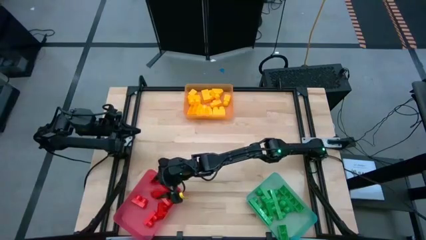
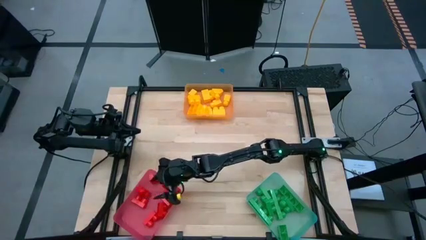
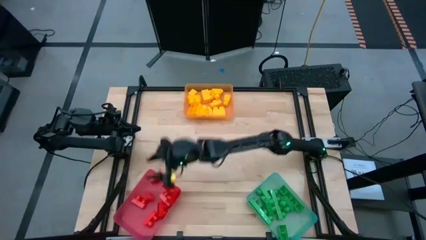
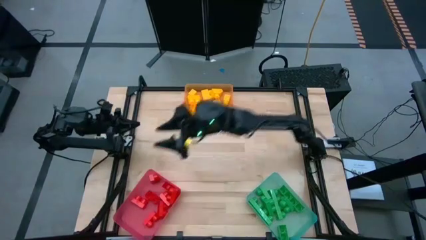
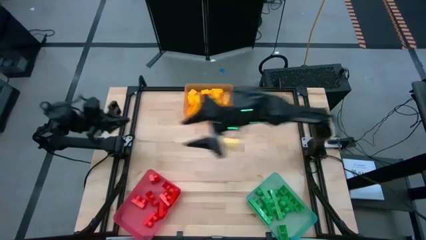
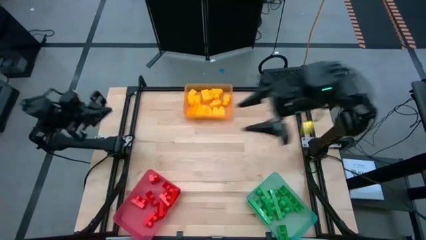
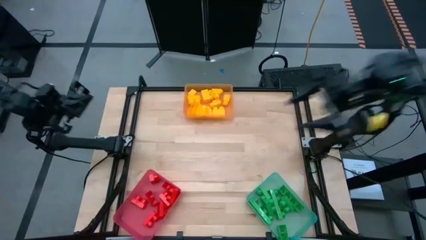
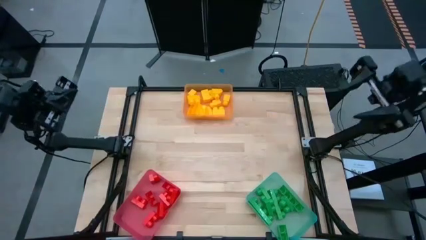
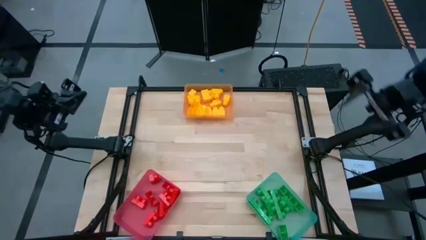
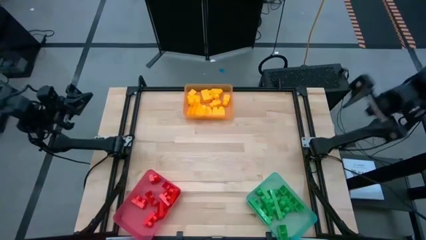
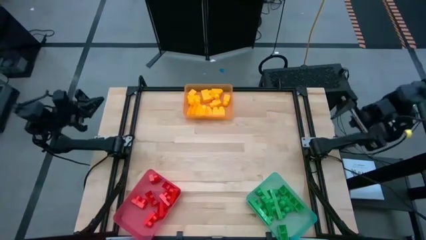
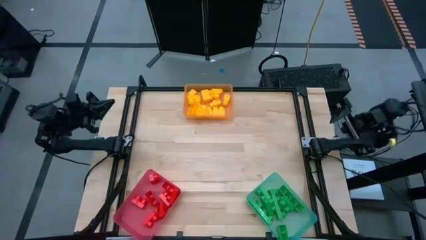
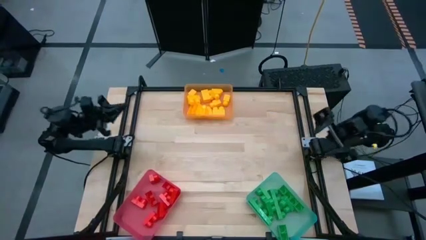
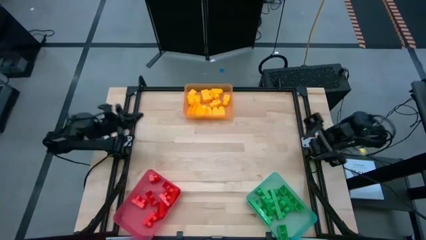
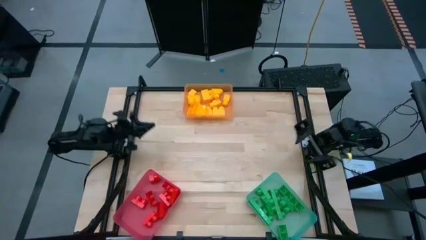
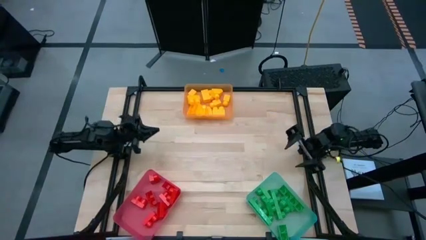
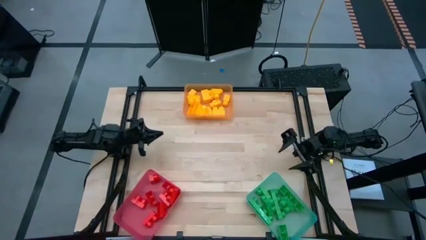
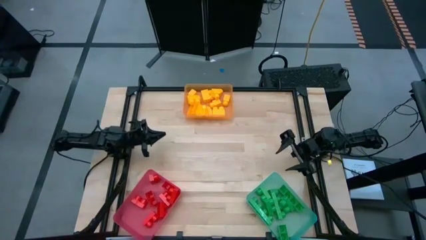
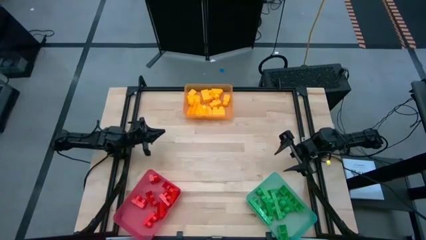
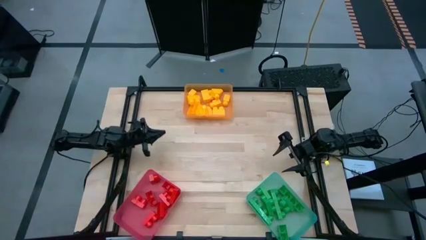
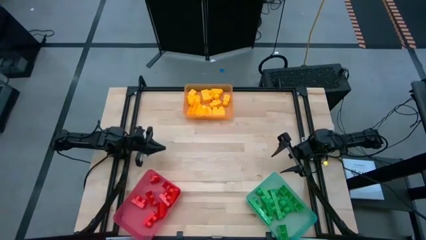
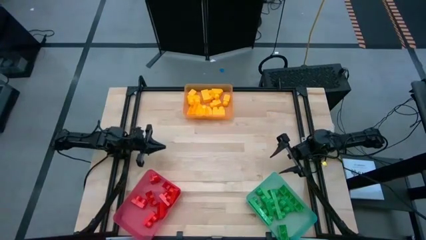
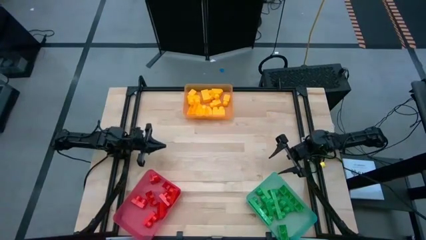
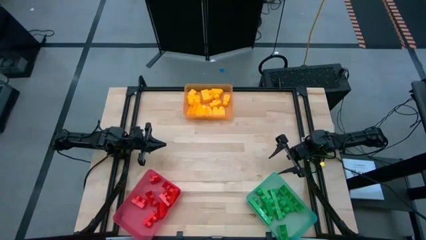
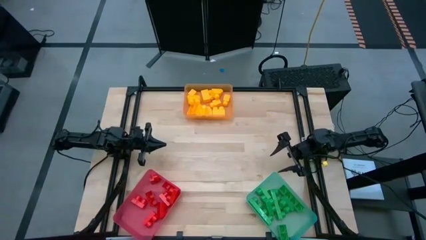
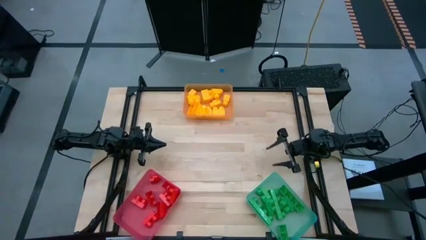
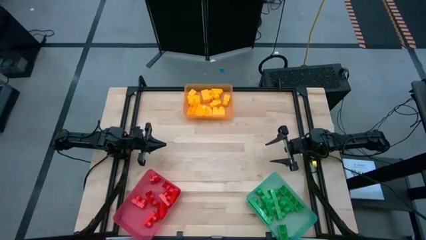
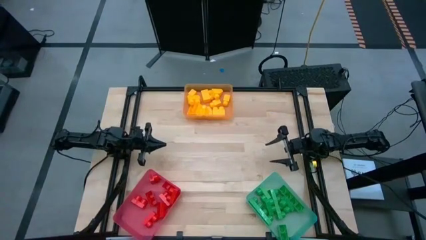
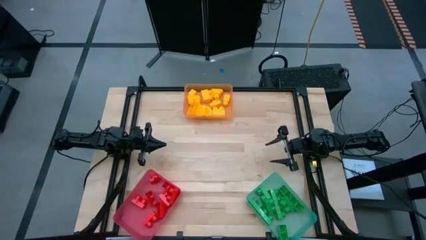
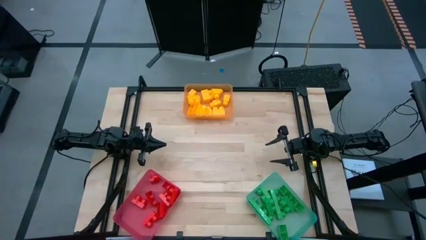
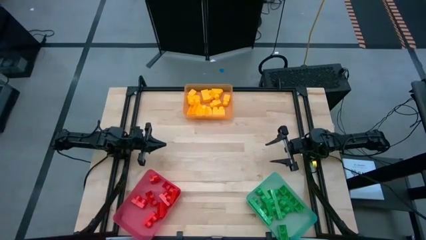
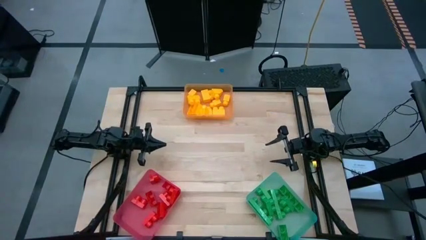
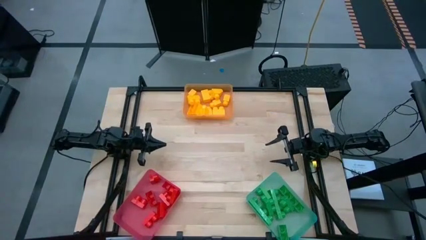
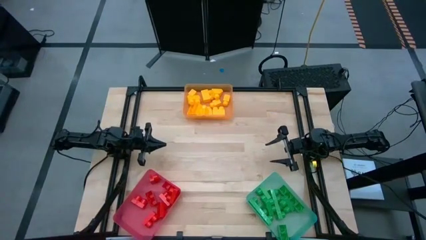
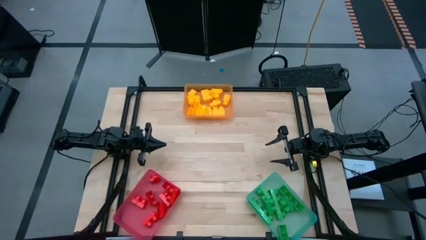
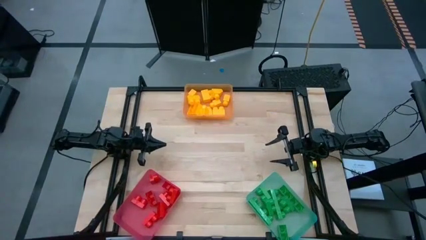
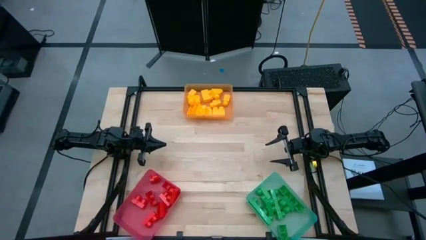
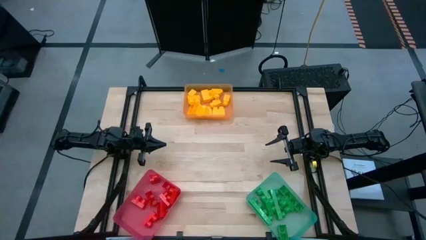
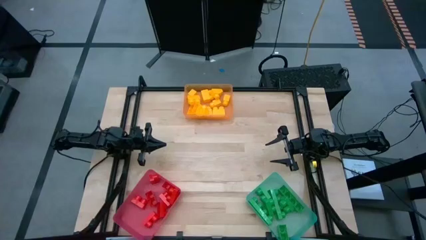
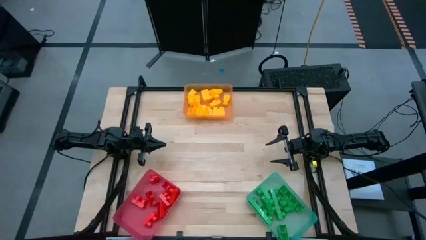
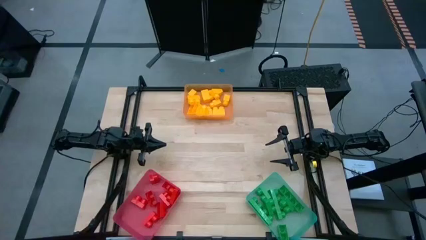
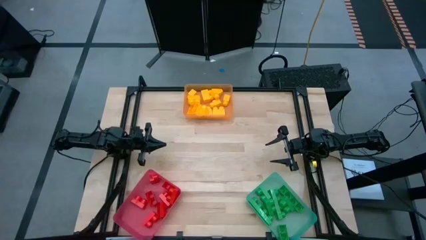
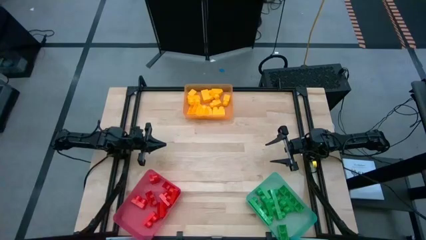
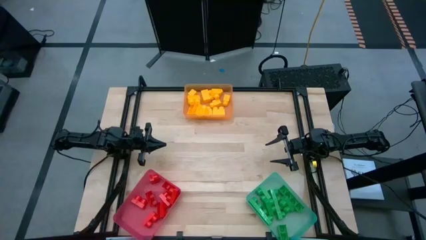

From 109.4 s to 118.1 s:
Task: Sort blocks
Return to Home Position

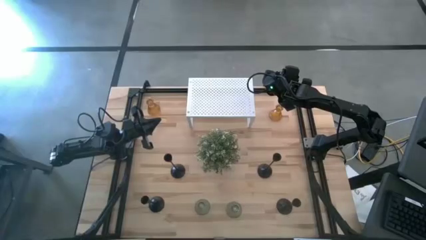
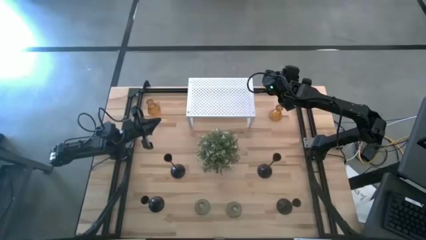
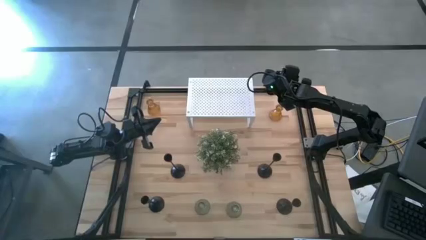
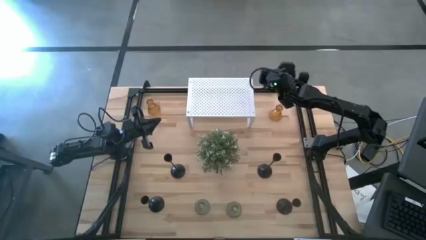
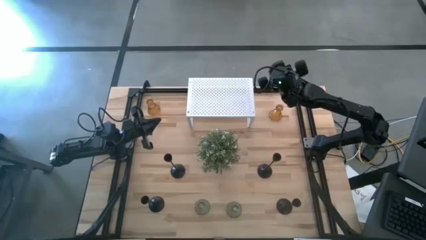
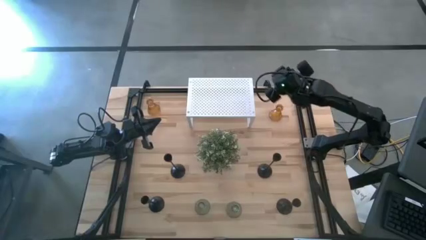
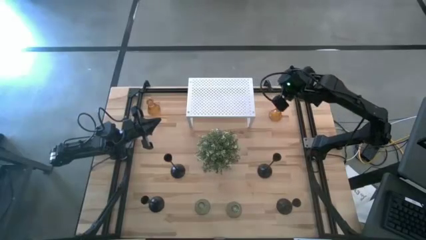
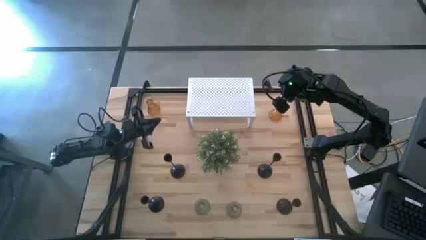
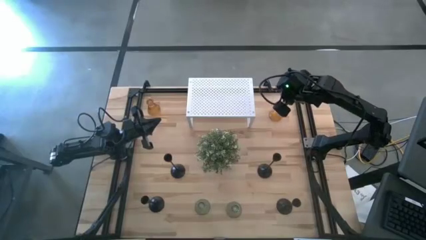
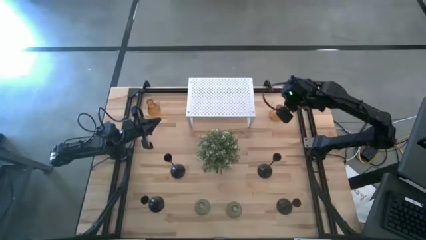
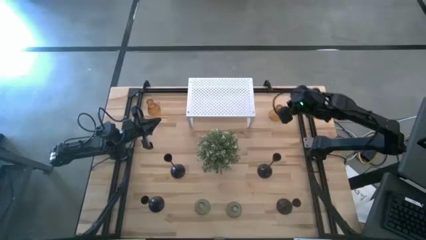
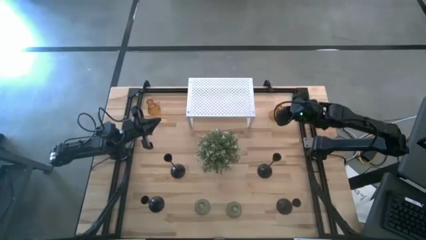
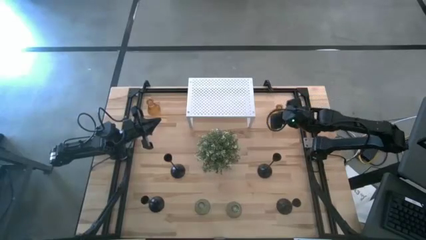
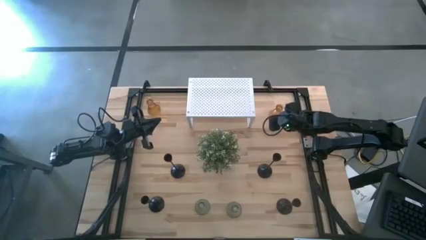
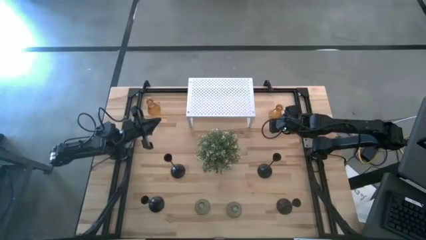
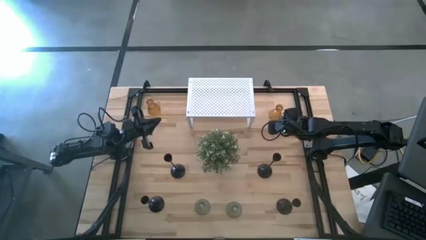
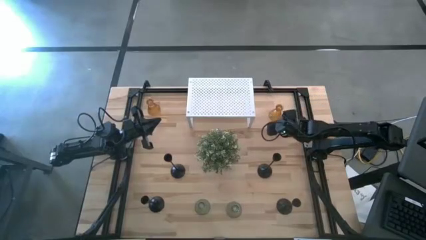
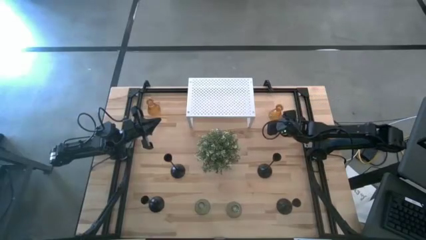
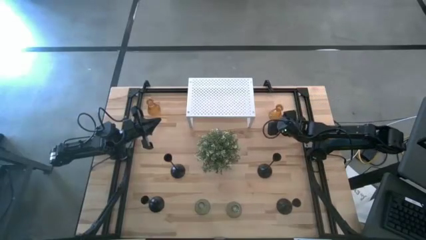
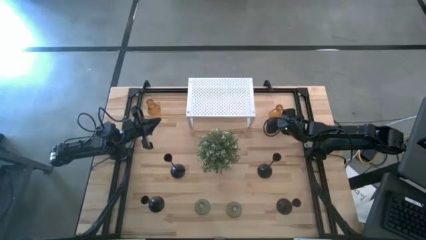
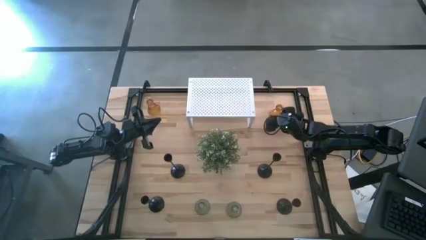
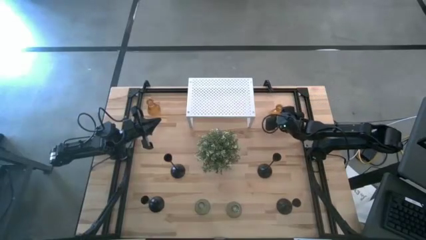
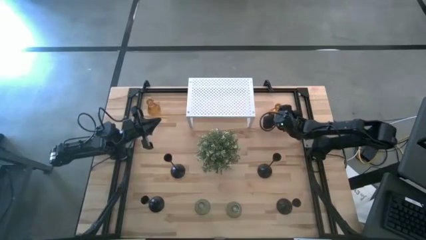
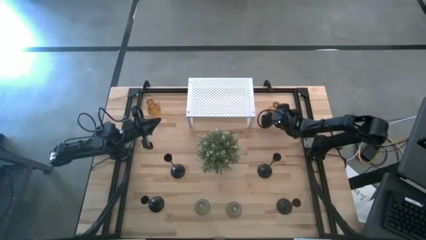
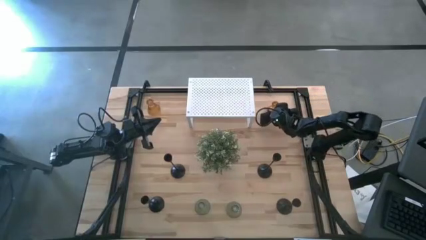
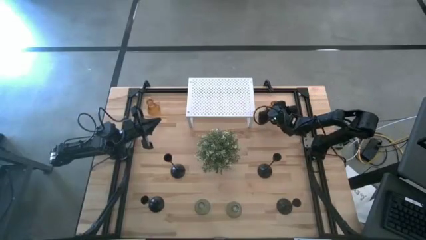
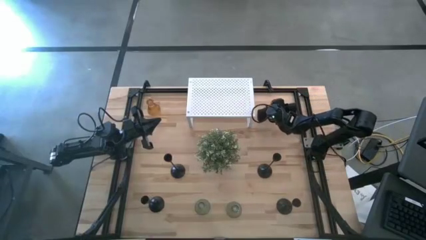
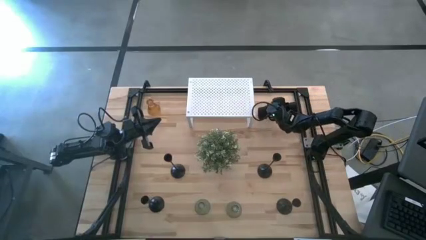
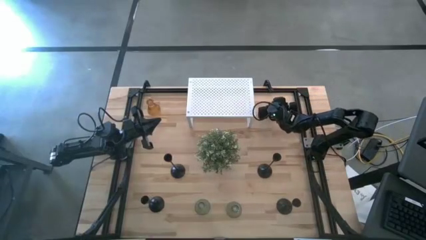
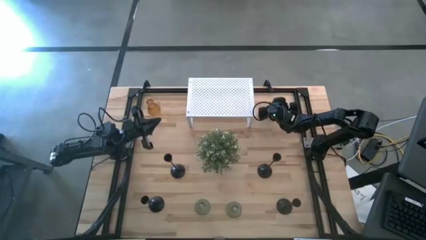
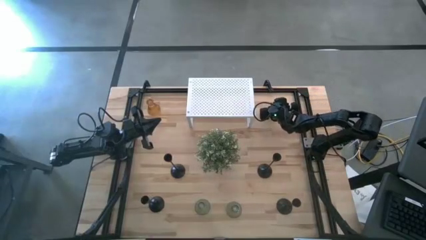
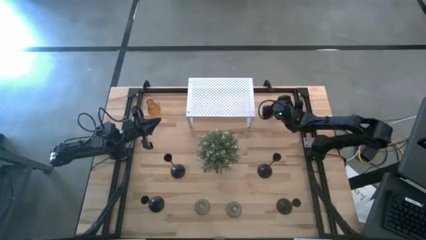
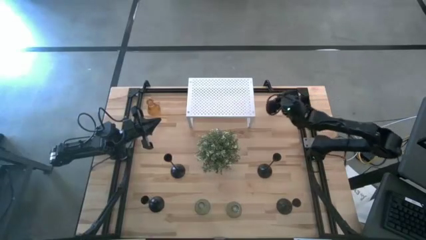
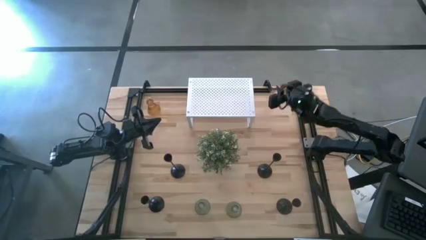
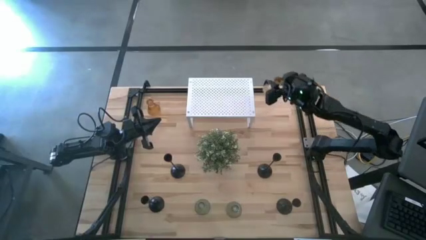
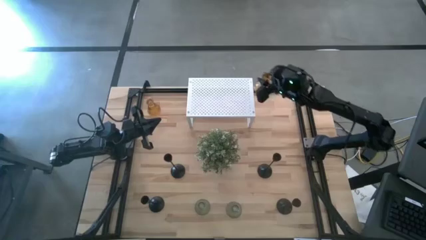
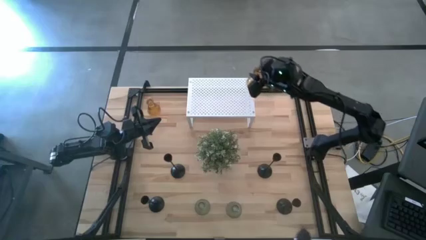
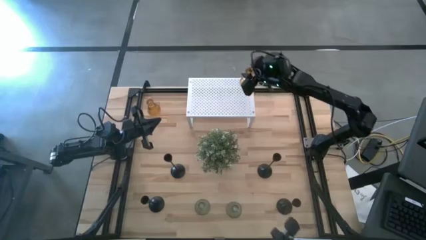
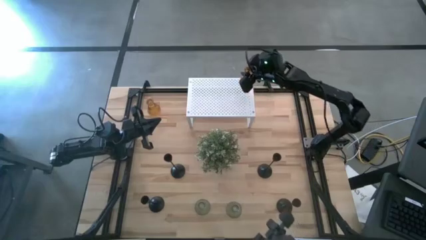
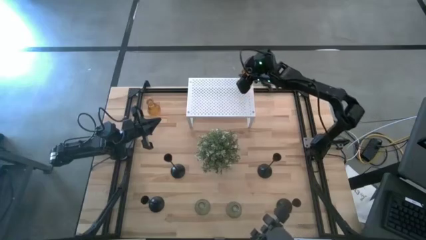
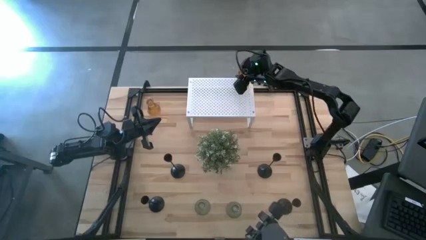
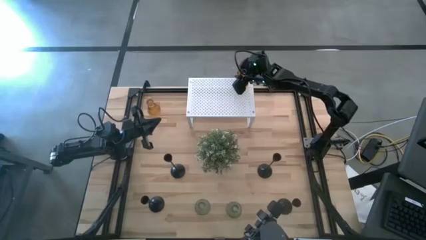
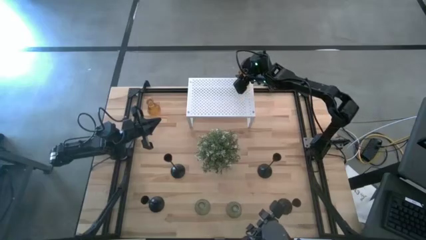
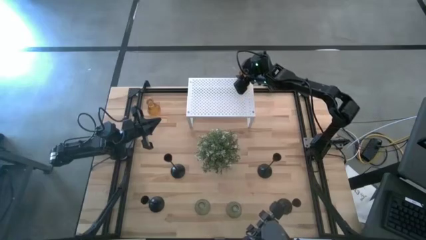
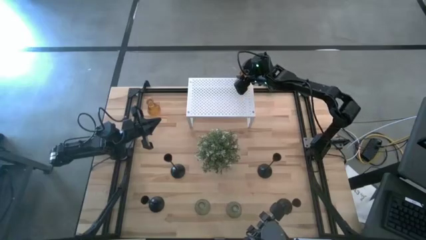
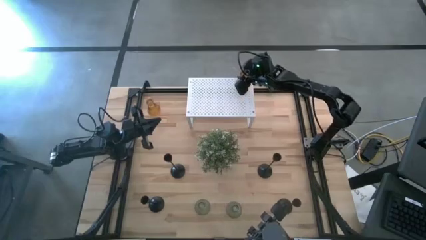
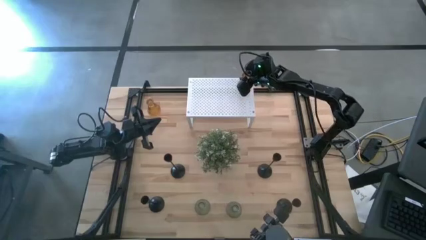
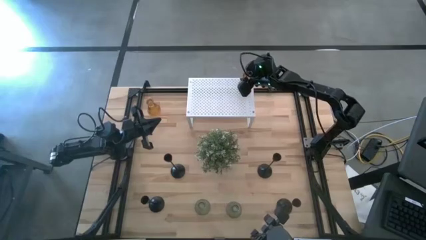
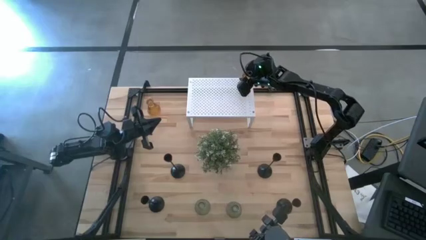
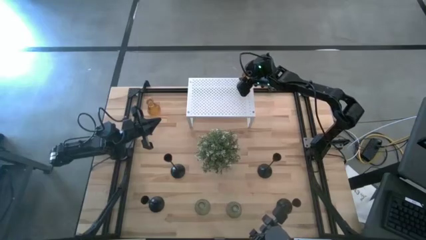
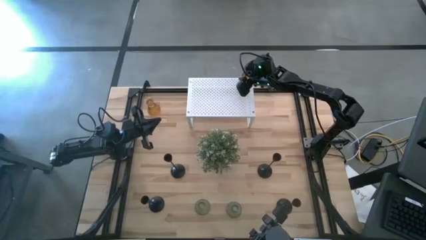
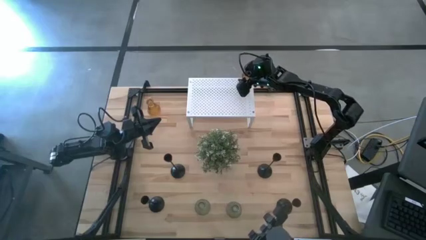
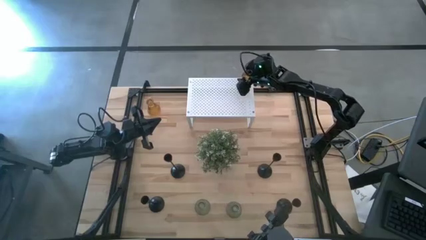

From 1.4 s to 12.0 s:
Task: Pick & Place candle stick holders
Put the right orange glass candle holder on the shelf
